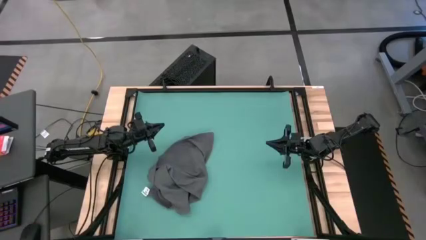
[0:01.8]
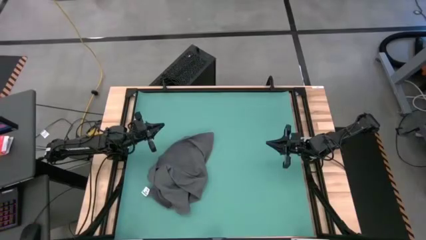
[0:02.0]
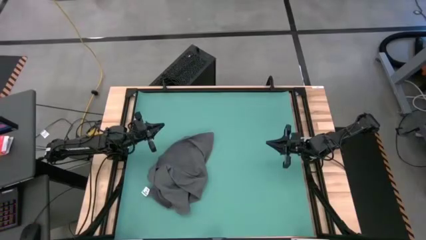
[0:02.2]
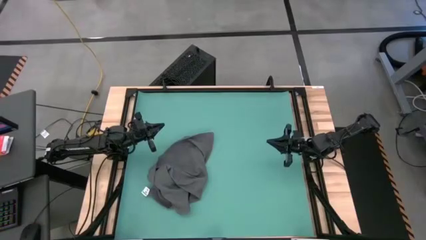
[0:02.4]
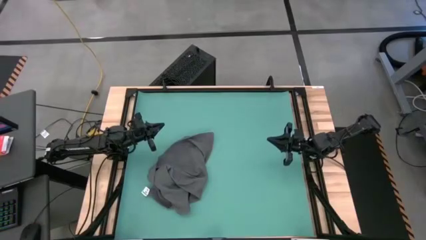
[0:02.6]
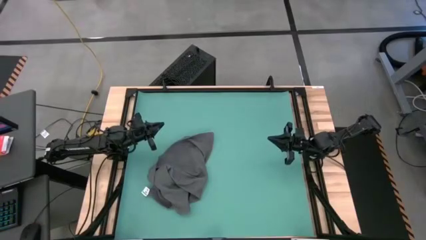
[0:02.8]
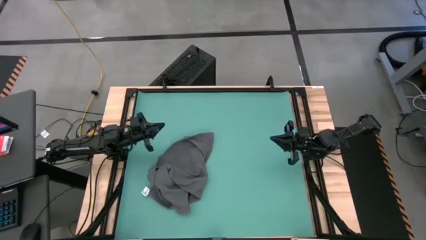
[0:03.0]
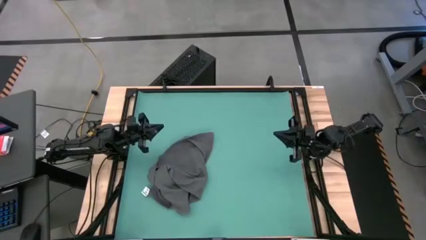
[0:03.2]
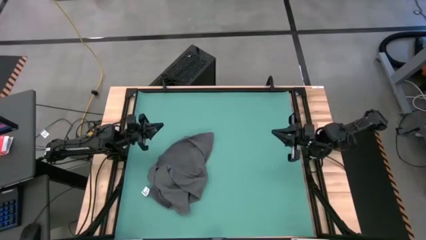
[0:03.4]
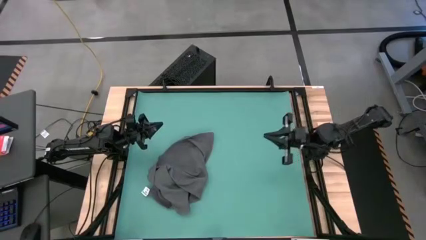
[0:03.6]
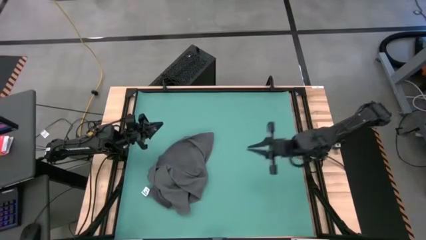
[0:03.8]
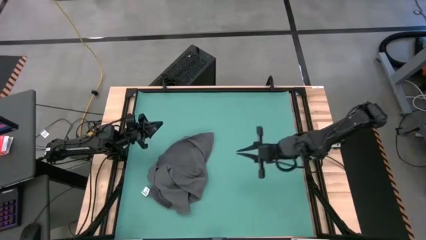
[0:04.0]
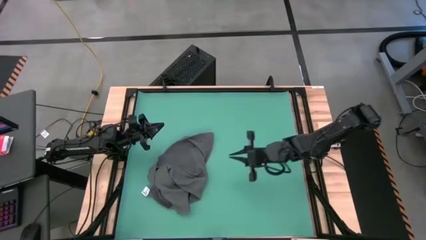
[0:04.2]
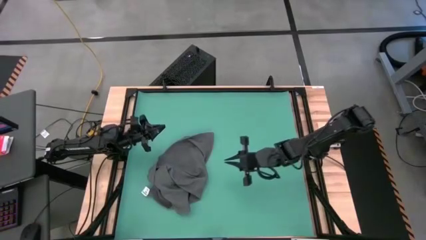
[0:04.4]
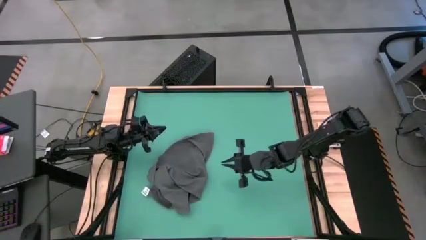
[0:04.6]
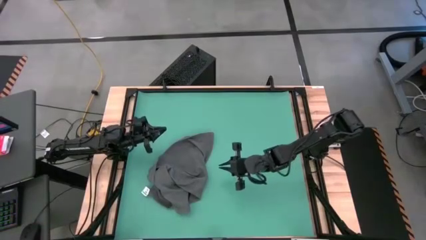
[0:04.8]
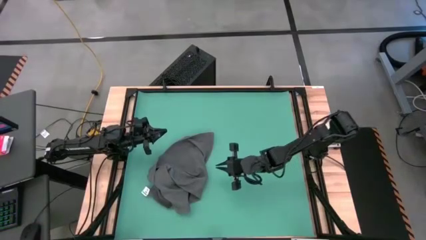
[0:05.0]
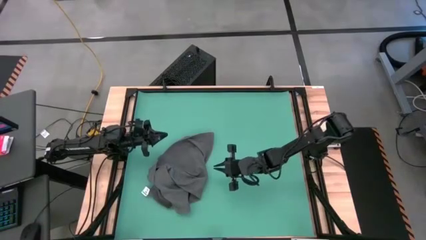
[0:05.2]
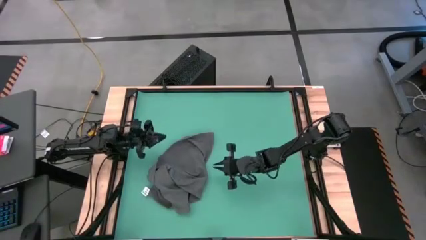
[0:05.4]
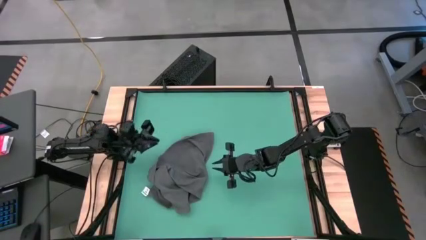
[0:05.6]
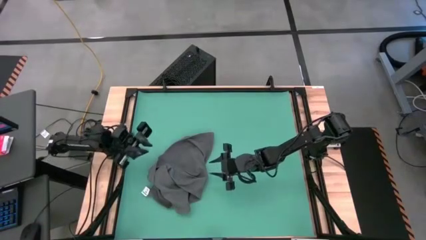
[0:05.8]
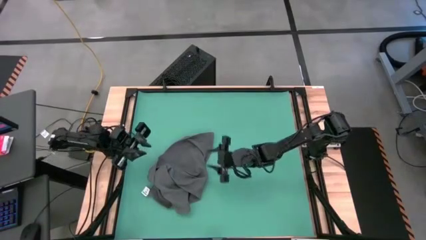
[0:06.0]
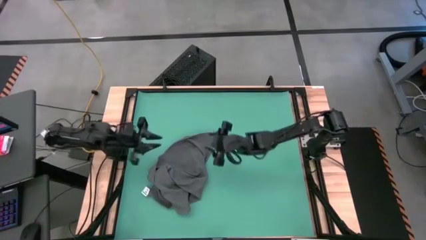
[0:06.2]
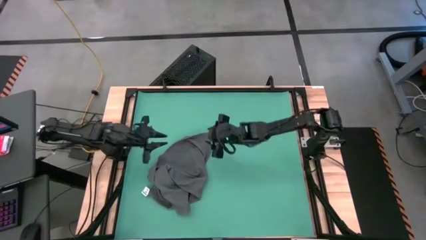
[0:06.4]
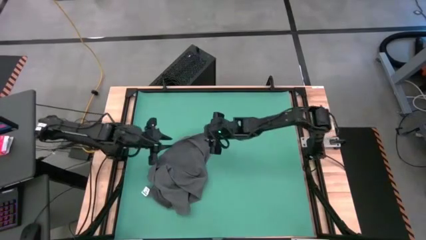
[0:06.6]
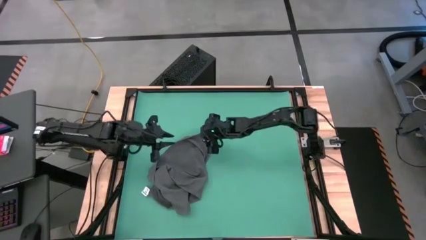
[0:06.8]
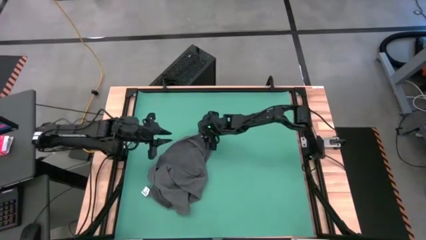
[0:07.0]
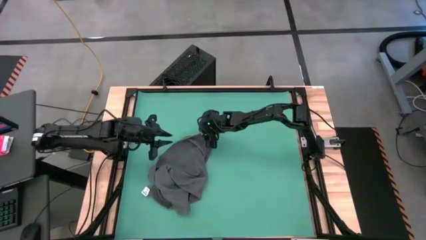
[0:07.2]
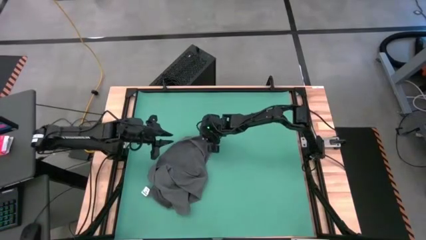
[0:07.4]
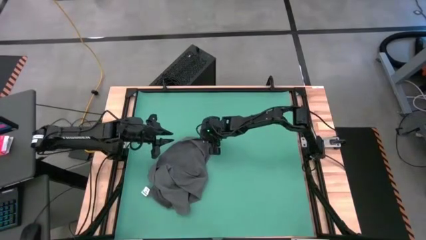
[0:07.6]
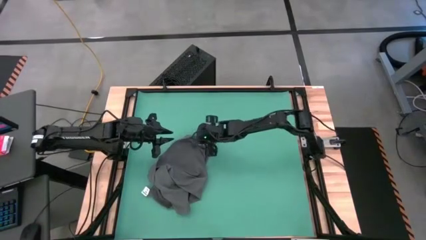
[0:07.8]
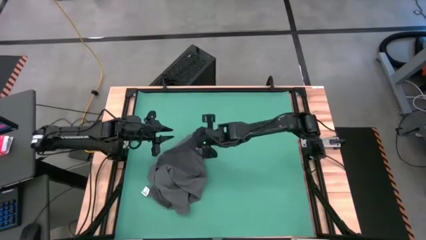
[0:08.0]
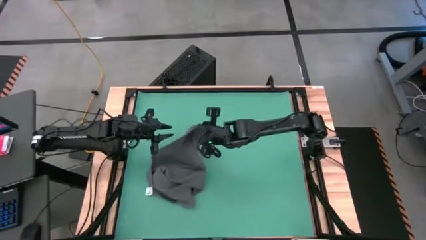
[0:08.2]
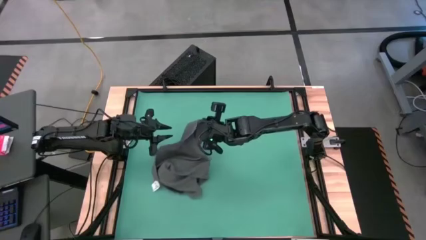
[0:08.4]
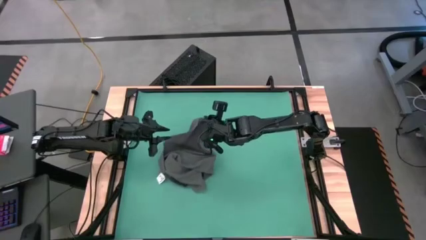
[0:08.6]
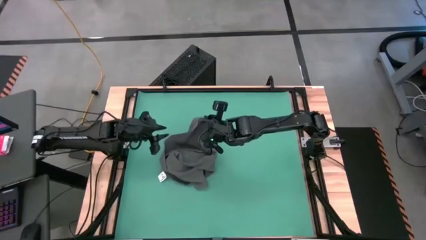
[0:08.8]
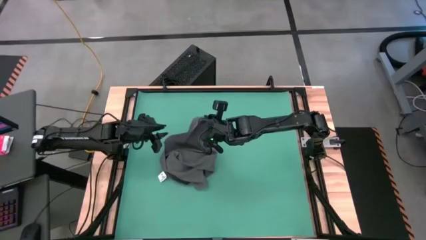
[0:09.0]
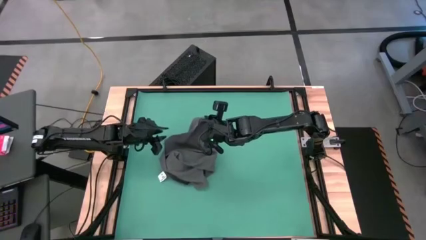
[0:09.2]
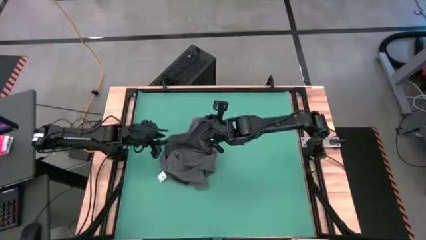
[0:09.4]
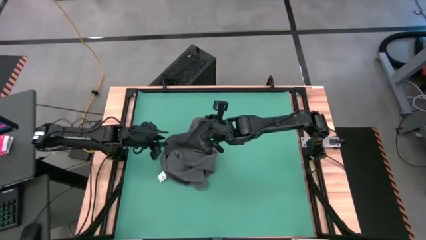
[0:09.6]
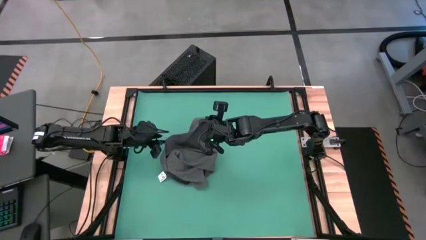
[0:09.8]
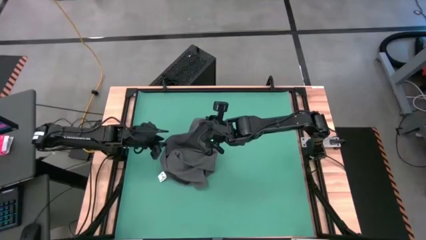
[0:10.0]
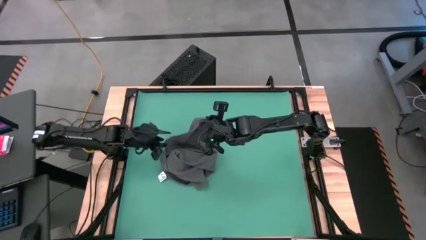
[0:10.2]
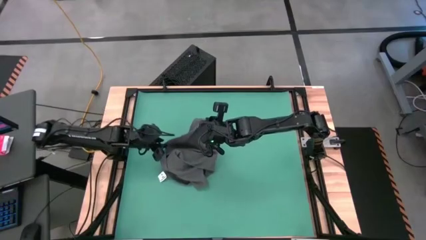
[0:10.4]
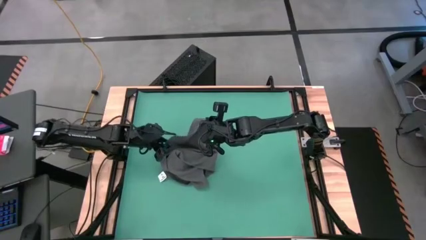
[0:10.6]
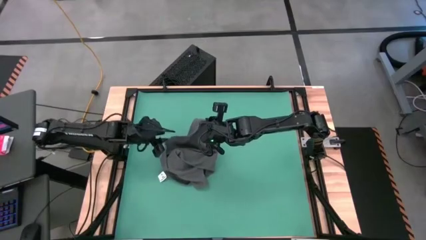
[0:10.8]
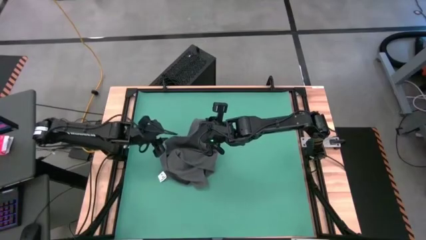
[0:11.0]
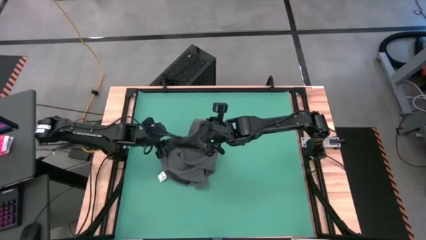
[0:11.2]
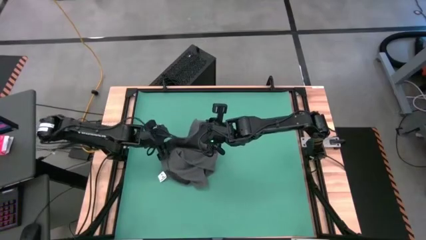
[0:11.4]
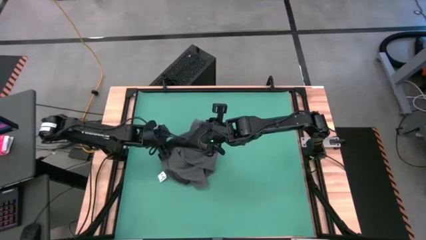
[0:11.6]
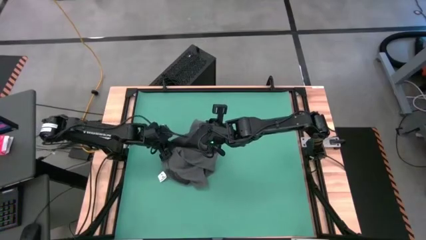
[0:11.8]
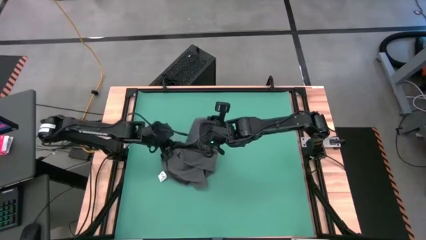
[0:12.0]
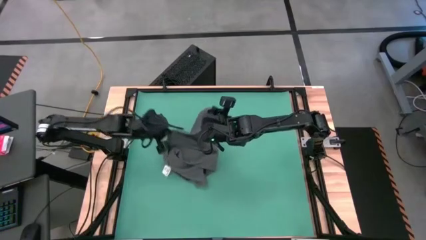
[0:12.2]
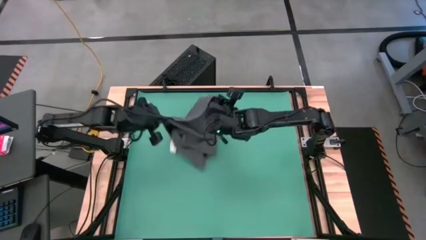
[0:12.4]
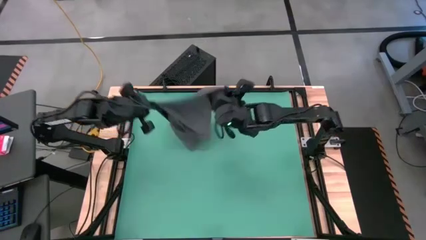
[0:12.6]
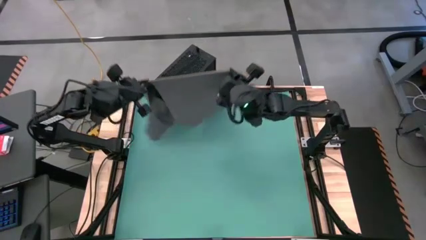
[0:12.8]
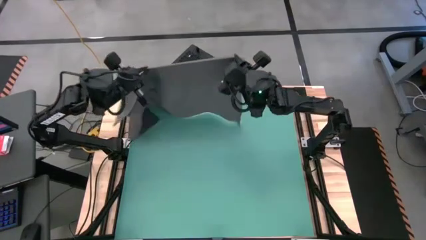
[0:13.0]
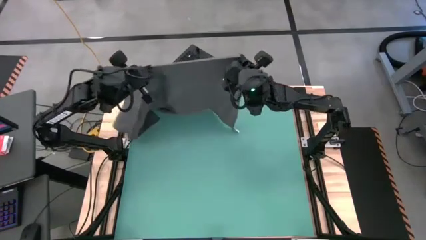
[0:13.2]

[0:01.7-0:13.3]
Task: Roll towel
Roll the gray towel

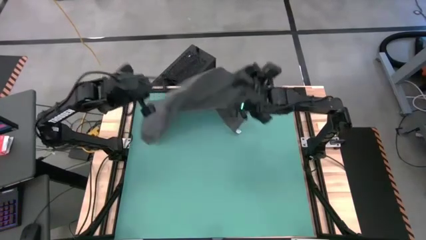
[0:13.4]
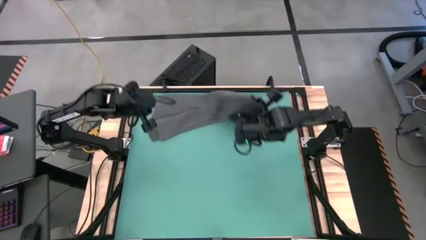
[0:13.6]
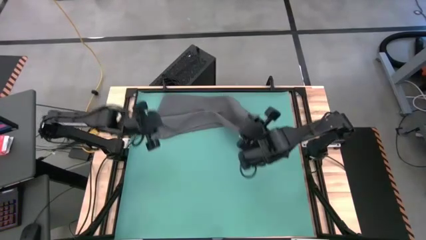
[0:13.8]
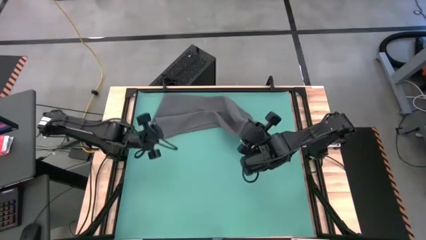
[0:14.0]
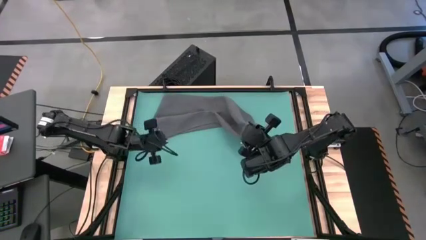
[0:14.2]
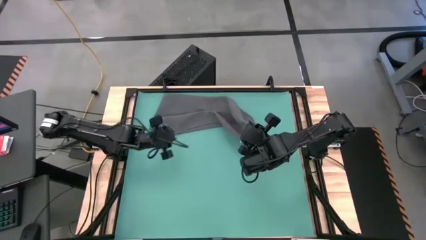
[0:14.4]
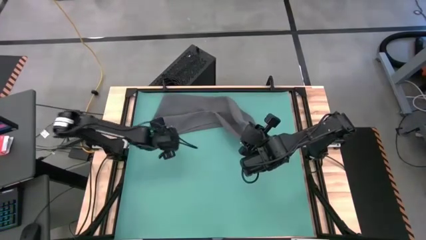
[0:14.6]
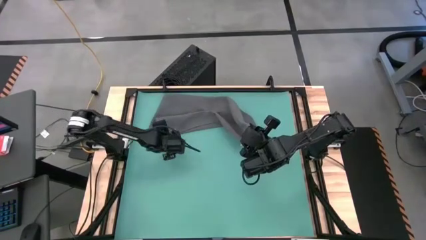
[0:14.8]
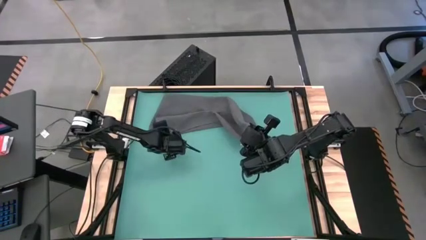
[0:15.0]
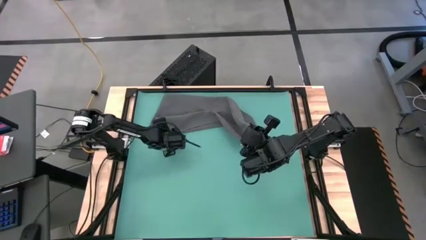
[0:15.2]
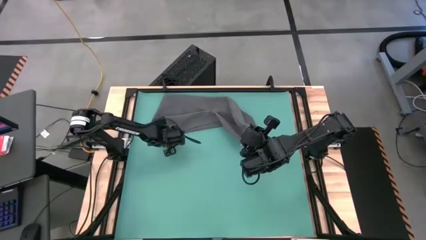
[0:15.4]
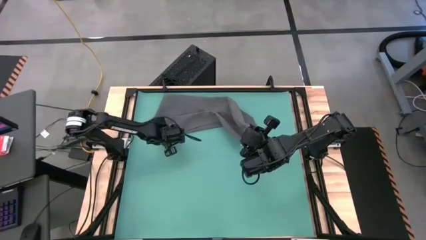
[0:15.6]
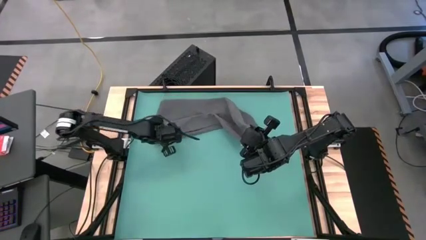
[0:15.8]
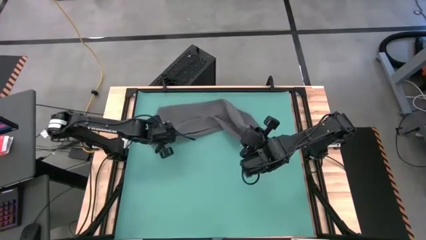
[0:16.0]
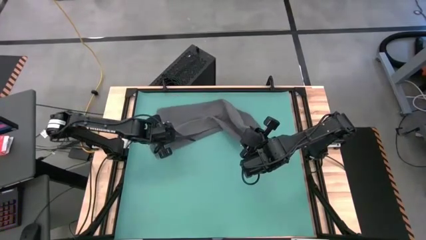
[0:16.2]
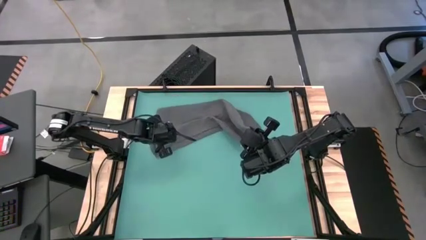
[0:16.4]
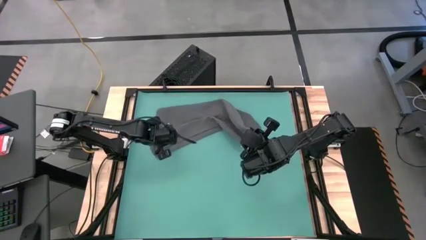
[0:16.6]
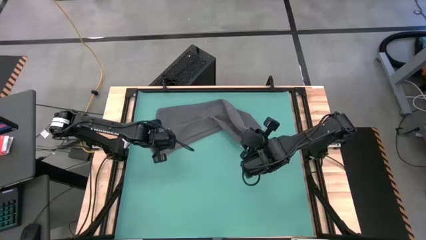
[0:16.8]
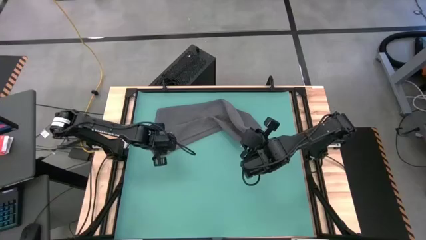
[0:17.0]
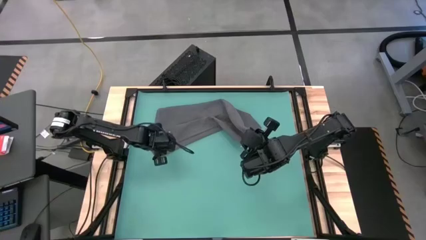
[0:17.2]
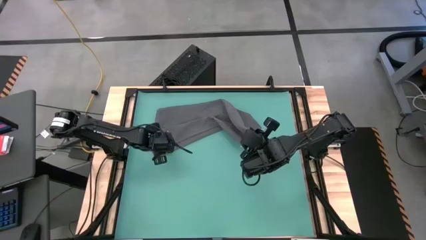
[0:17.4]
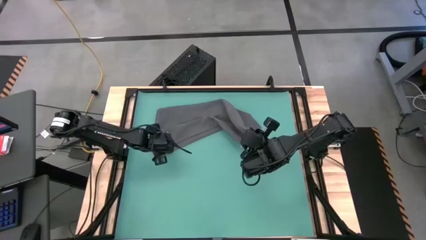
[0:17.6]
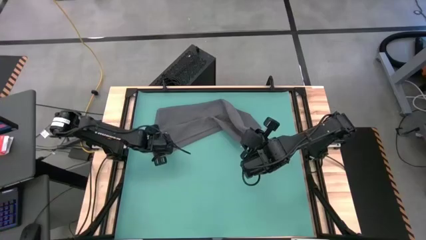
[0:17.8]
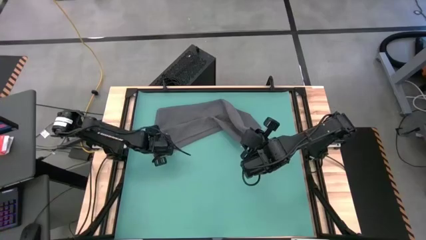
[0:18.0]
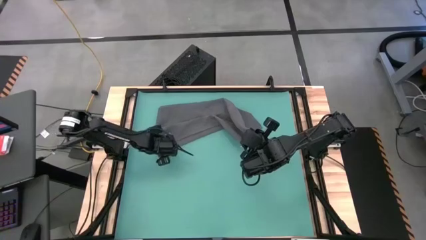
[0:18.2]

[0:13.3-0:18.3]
Roll the gray towel
